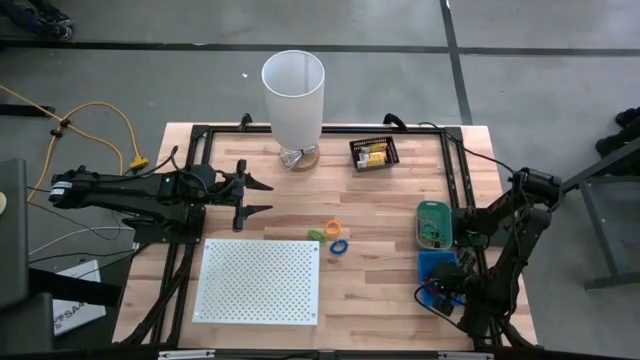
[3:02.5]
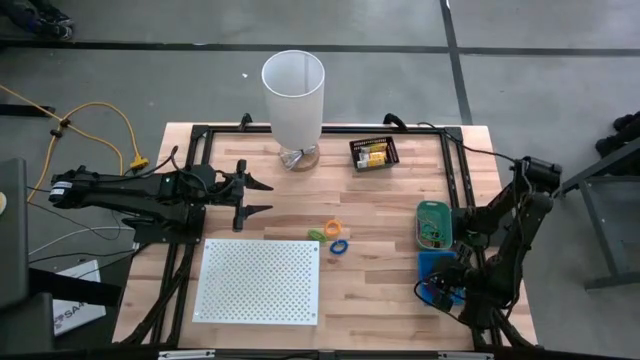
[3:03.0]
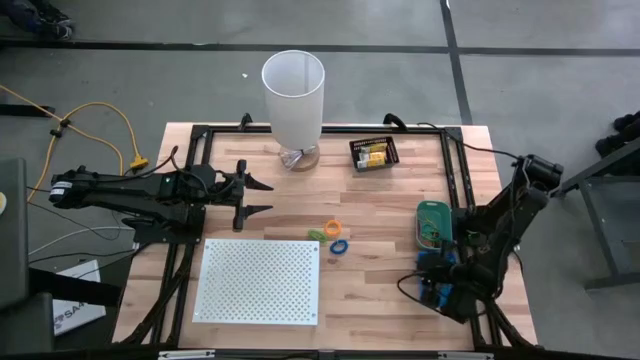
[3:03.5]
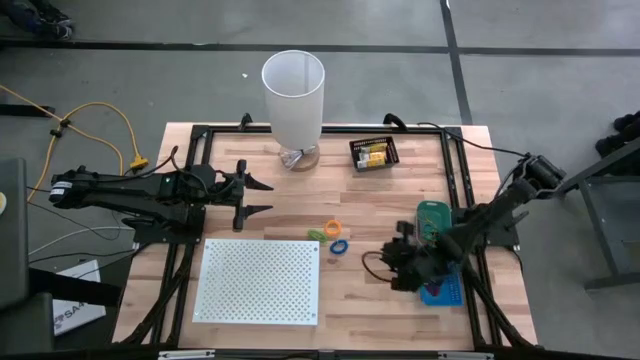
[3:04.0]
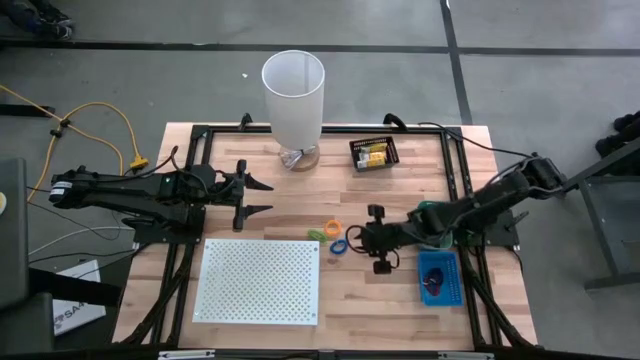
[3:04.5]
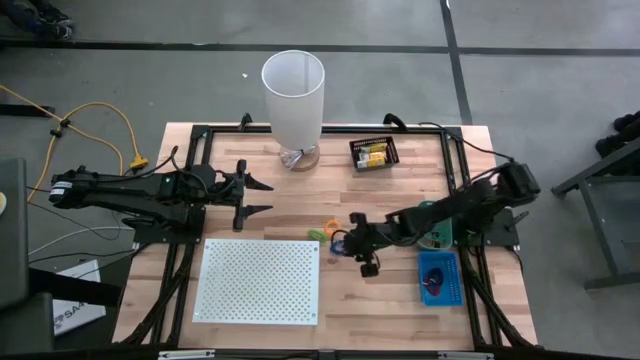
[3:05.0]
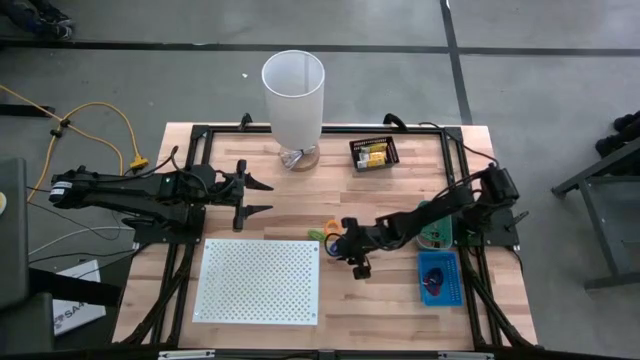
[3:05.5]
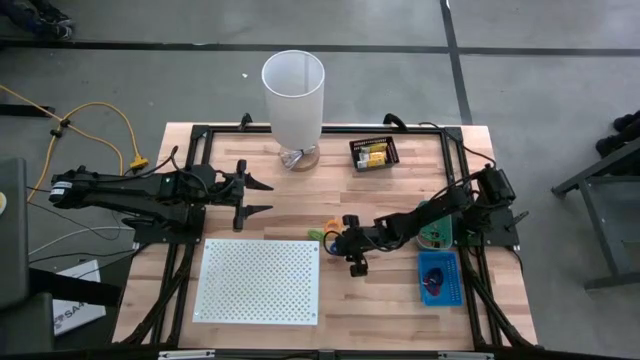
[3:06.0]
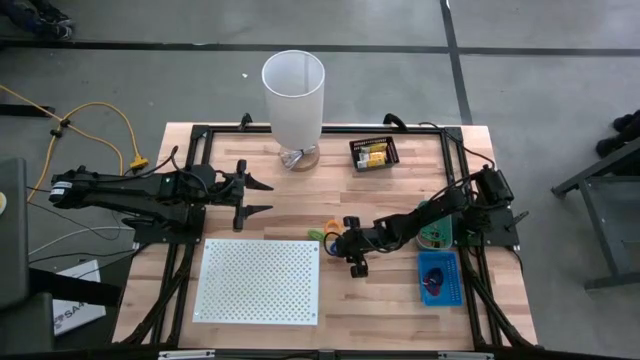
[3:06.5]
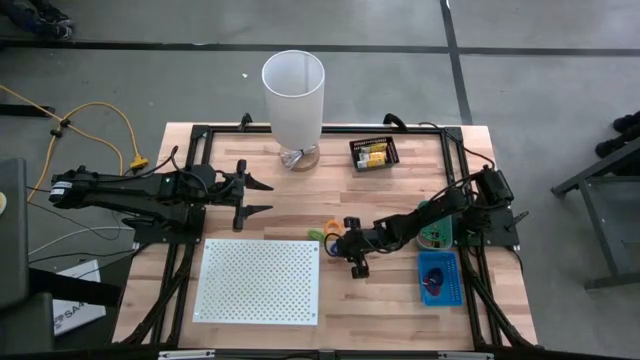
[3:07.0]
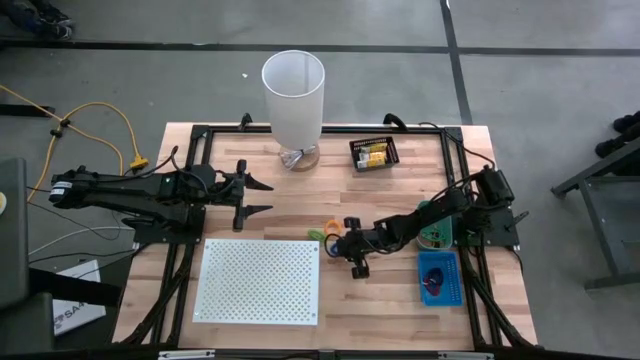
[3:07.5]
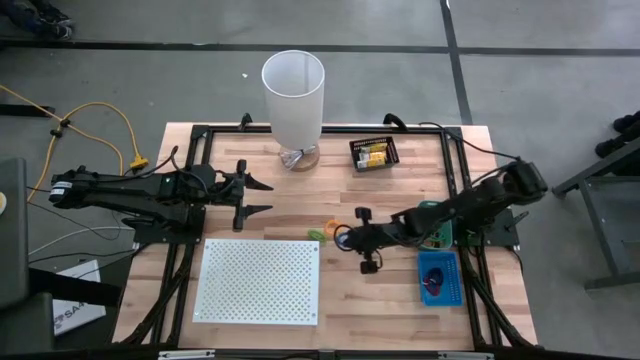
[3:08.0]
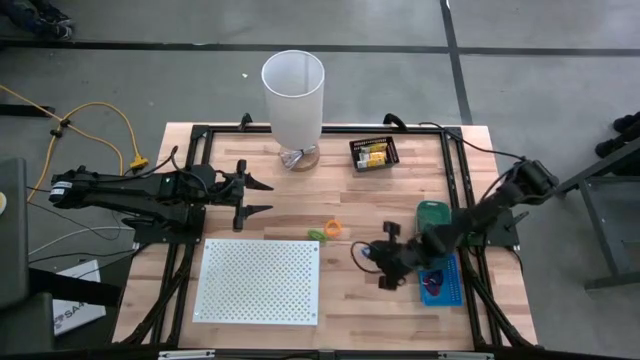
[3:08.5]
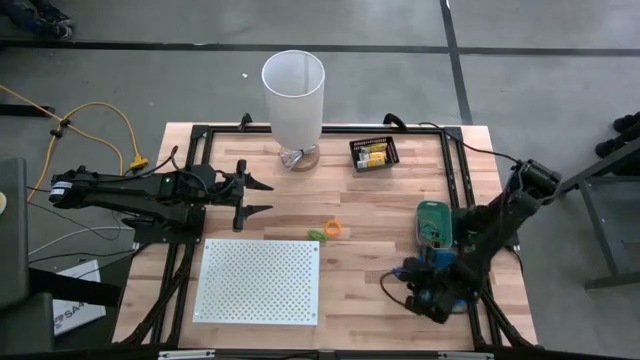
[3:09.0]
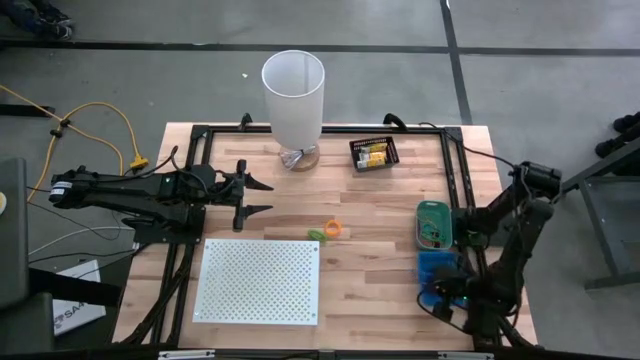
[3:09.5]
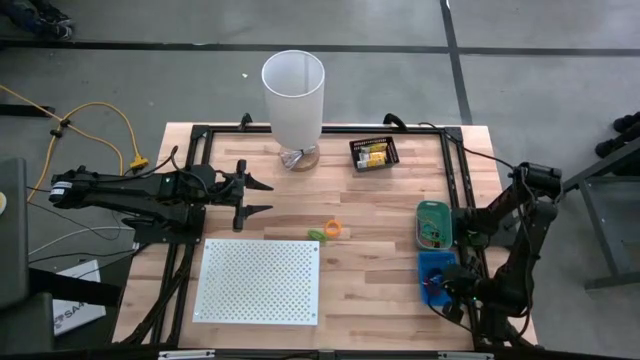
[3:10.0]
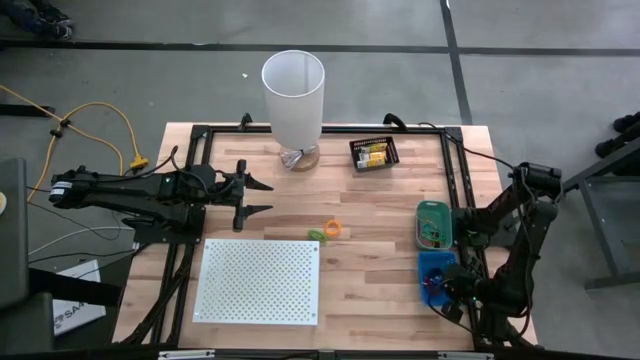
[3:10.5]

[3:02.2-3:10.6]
Task: Pick & Place Office Desk Supplies
Put the blue spring keychain into the blue bin

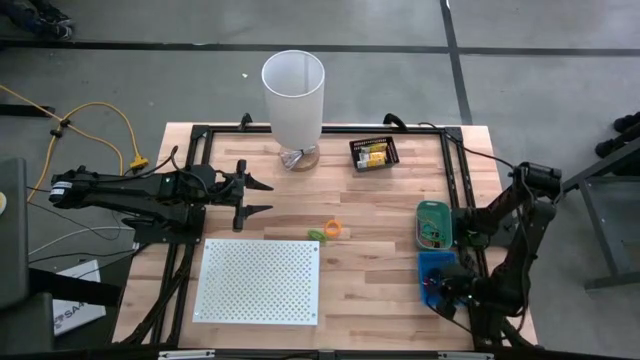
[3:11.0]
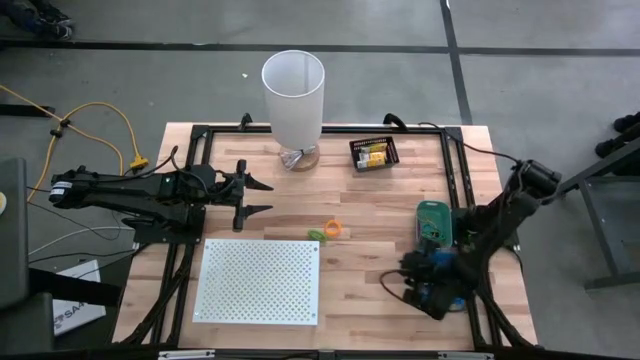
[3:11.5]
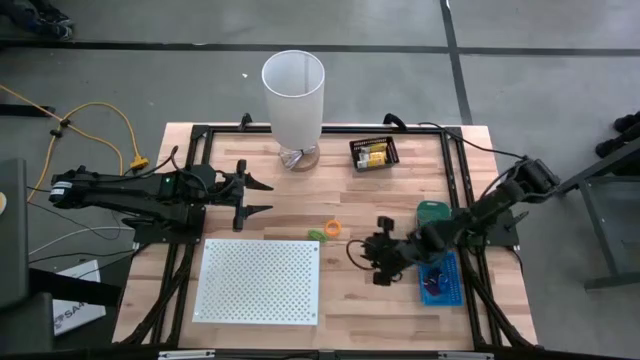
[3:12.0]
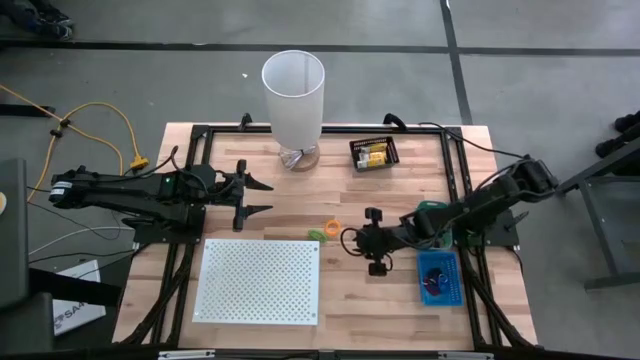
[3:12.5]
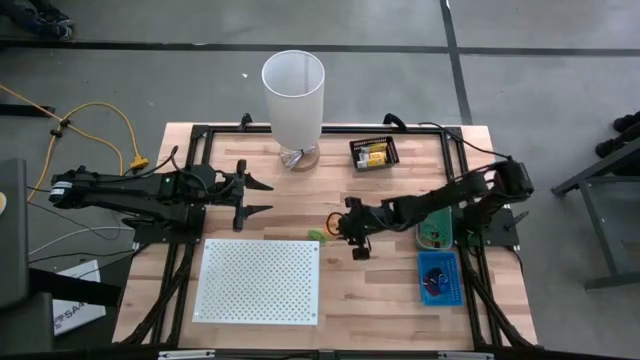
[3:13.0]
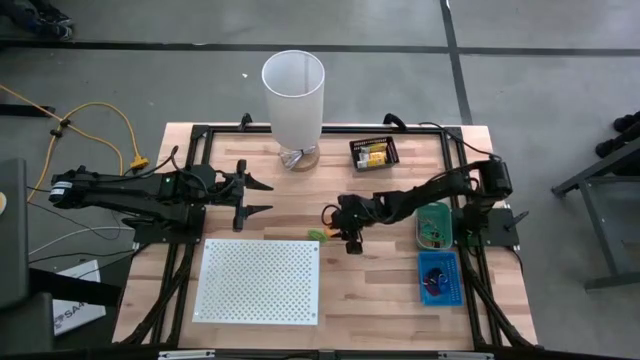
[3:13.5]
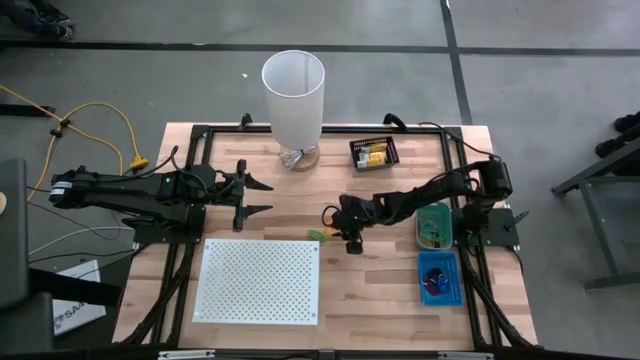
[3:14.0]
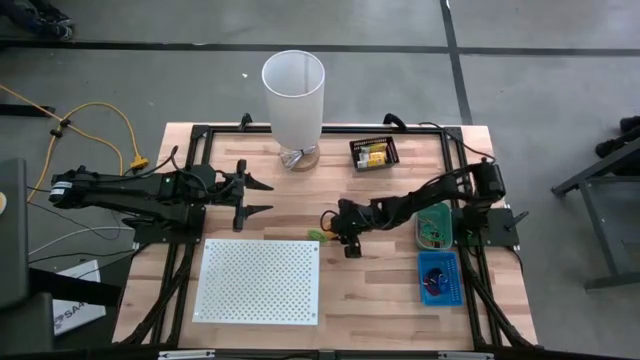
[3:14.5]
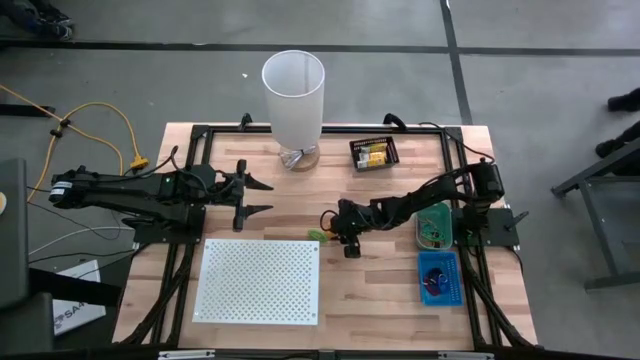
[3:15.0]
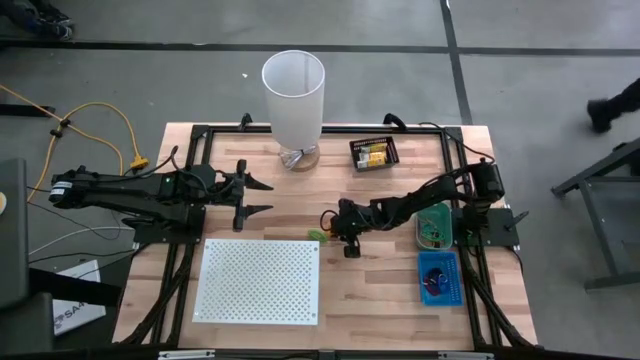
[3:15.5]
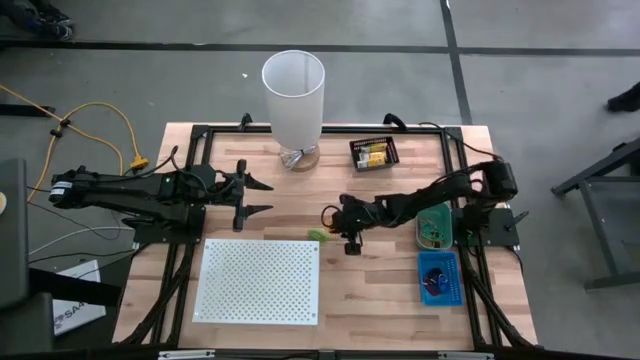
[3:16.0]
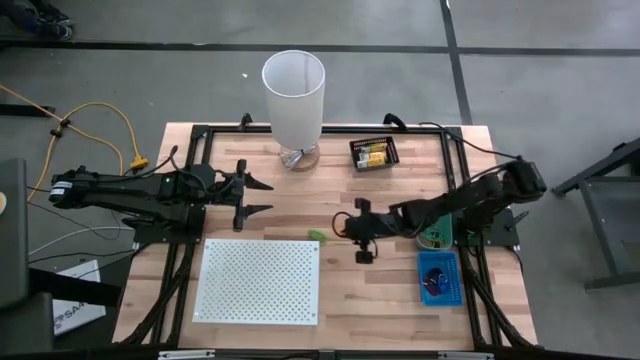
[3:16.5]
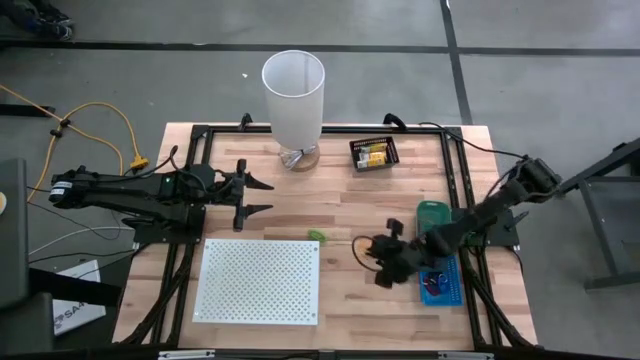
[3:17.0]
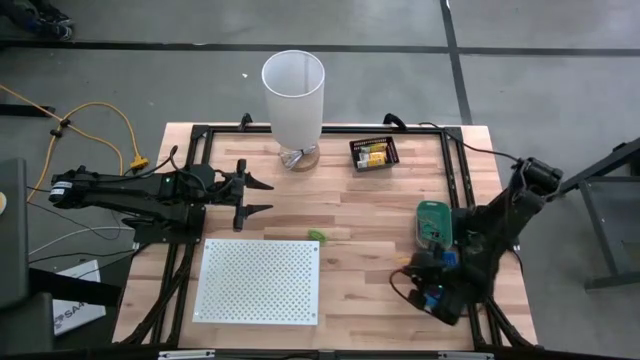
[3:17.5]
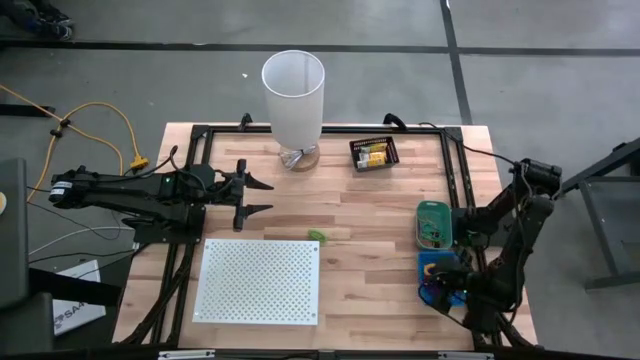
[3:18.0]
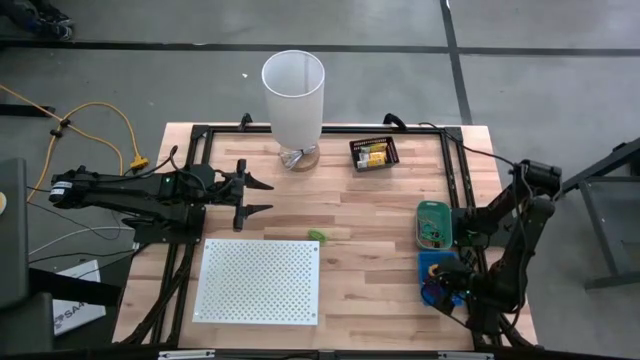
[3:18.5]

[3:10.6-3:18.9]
Put the yellow spring keychain into the blue bin

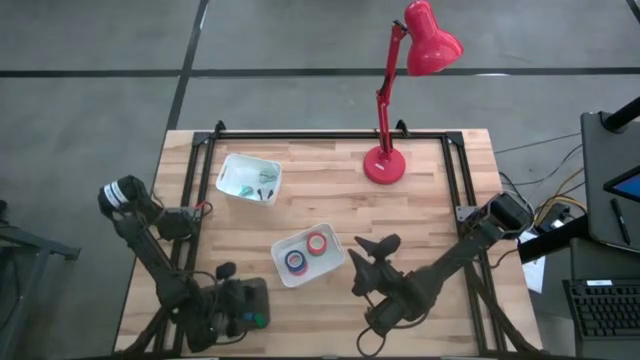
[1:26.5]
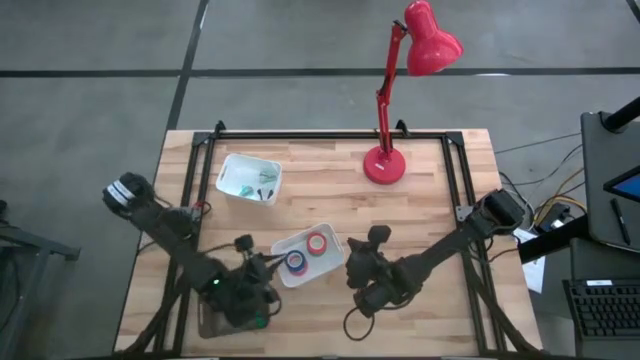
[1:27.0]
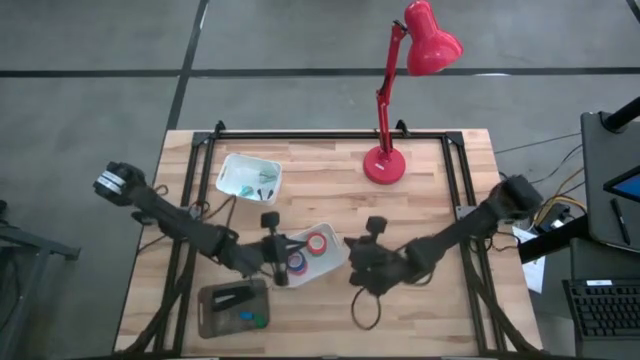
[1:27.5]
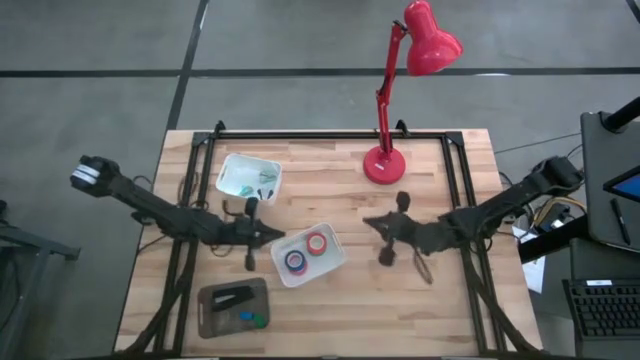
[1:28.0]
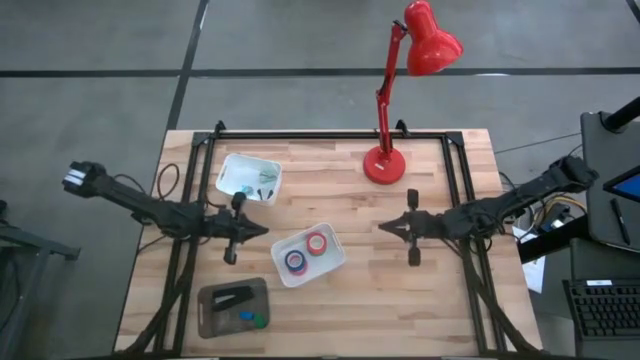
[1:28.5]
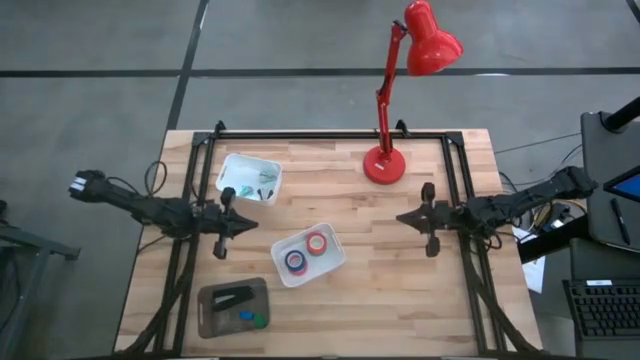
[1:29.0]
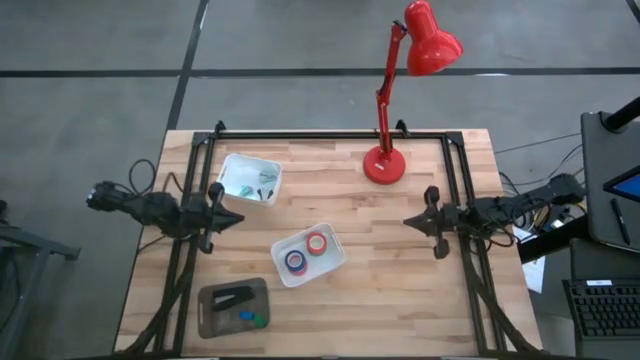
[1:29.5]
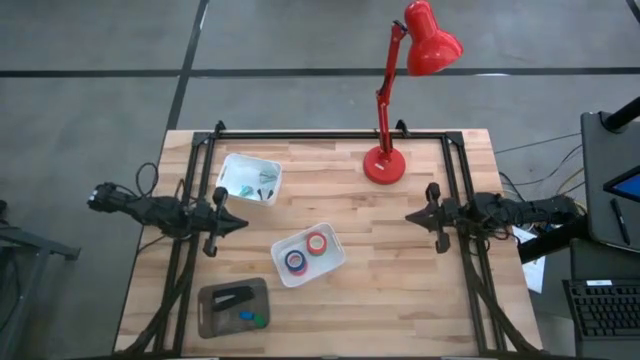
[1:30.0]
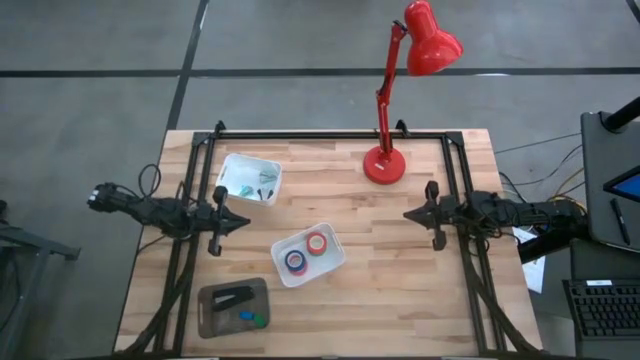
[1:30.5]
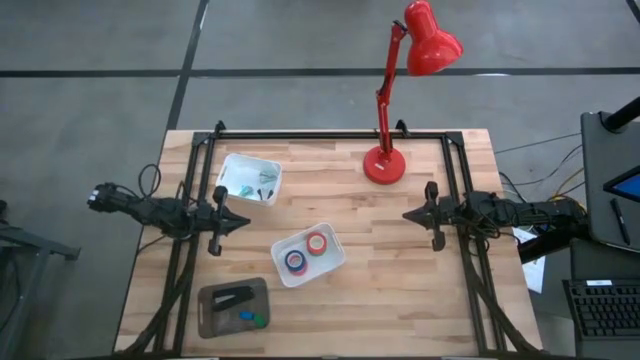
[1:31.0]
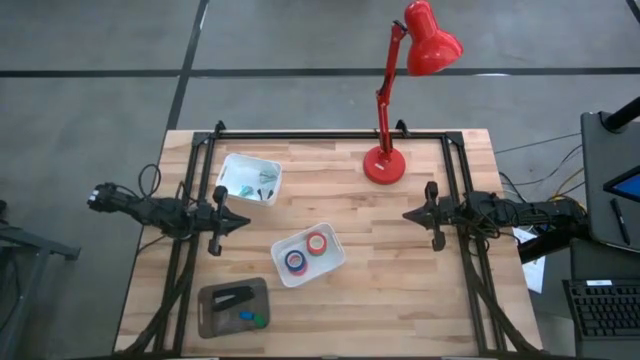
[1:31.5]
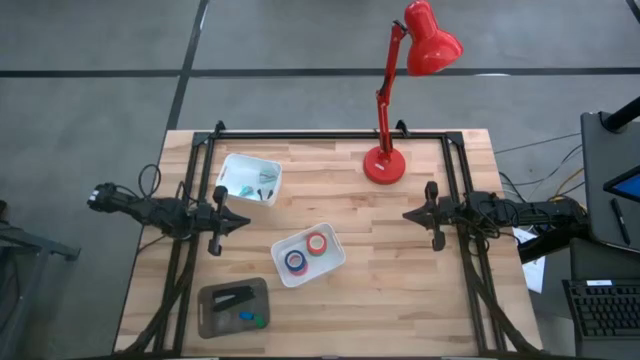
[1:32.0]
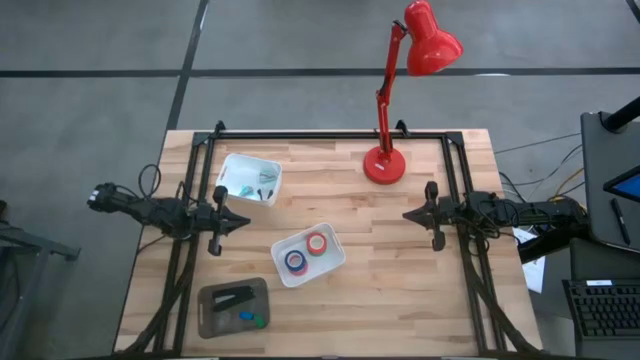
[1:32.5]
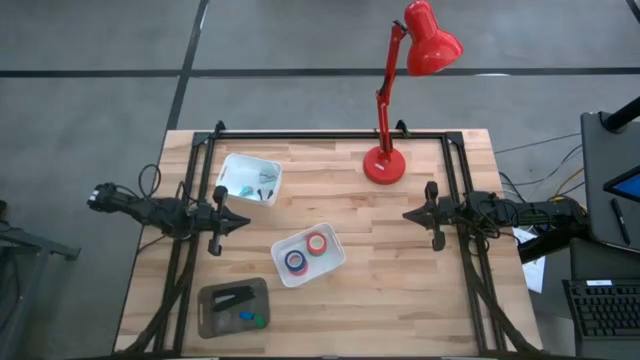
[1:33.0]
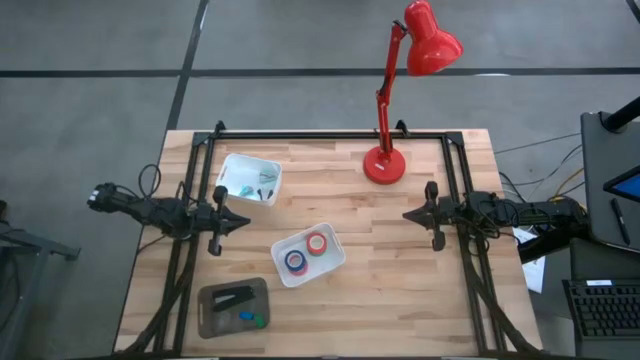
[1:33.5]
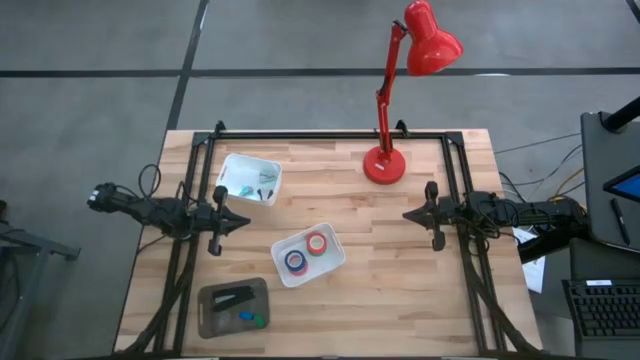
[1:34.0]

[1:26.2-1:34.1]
Task: Pick and place Stapler, Stapler remover, tape
Return to Home Position
